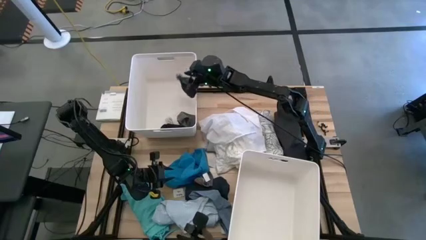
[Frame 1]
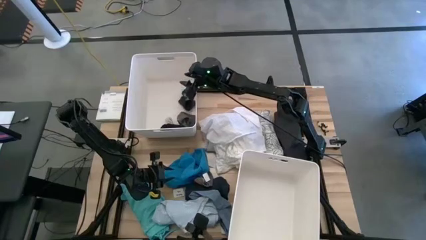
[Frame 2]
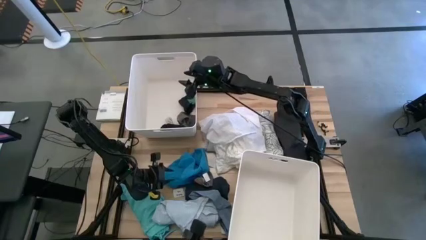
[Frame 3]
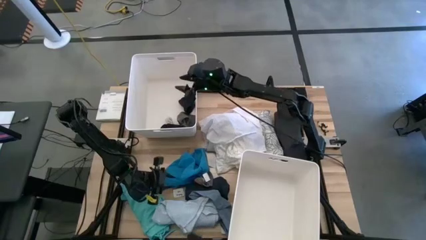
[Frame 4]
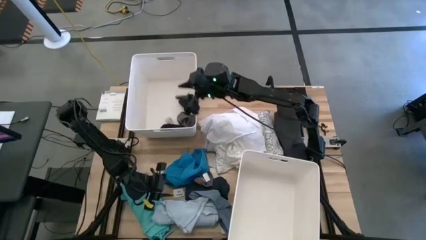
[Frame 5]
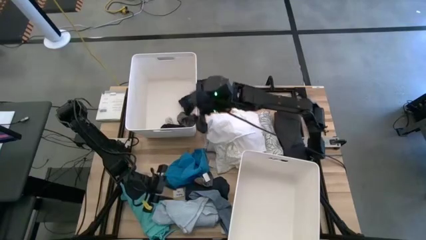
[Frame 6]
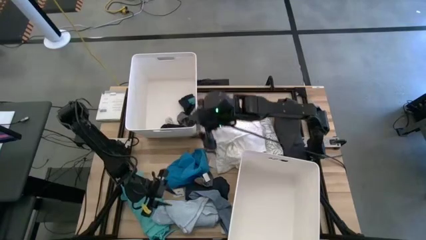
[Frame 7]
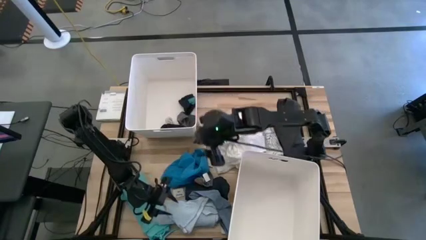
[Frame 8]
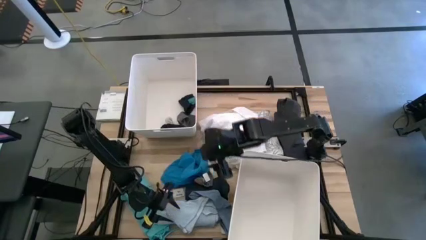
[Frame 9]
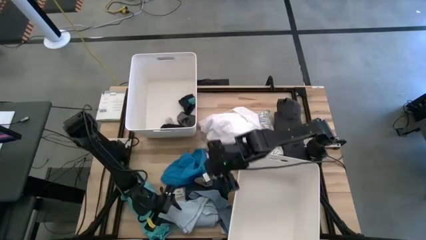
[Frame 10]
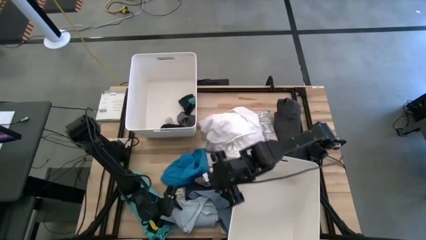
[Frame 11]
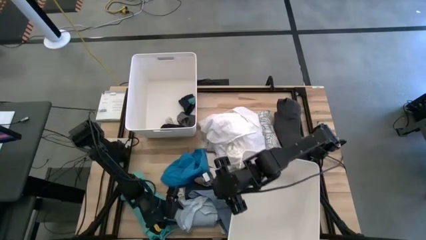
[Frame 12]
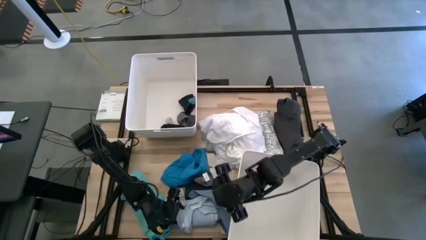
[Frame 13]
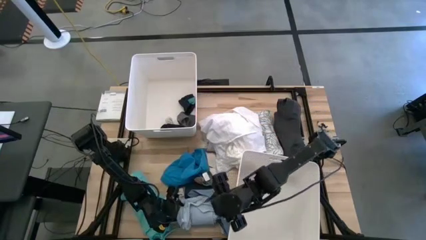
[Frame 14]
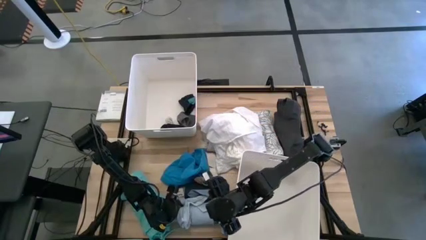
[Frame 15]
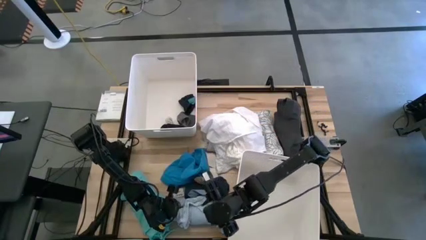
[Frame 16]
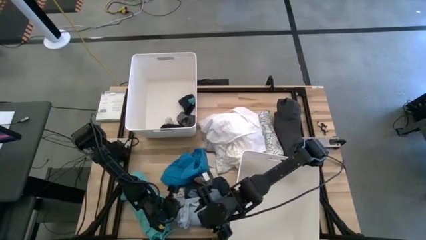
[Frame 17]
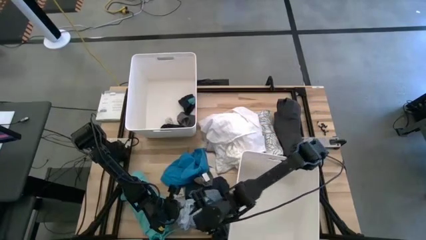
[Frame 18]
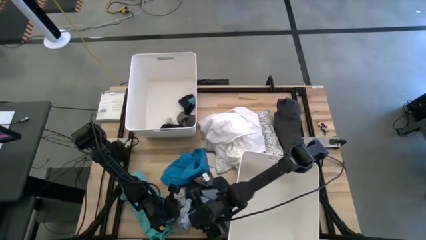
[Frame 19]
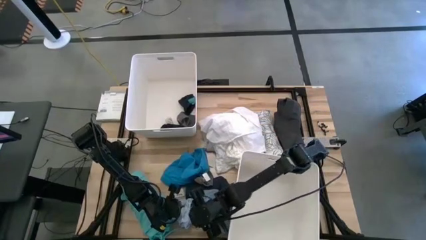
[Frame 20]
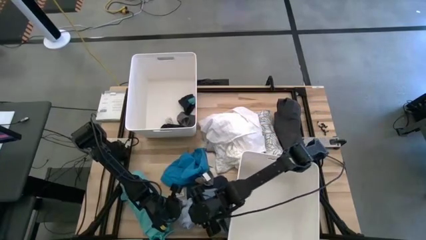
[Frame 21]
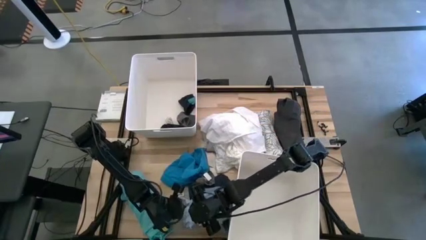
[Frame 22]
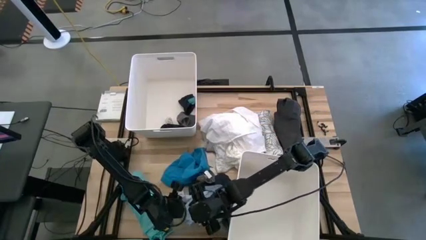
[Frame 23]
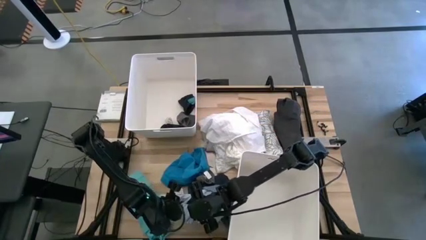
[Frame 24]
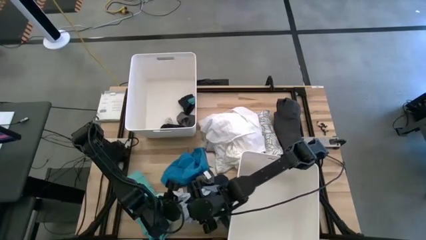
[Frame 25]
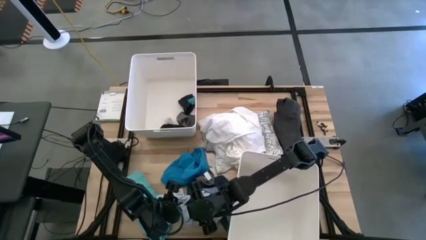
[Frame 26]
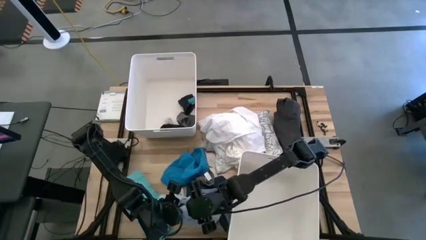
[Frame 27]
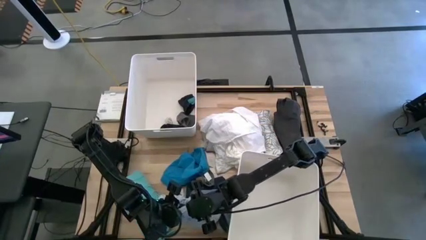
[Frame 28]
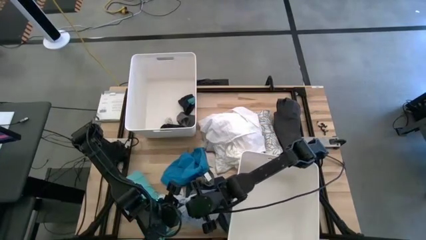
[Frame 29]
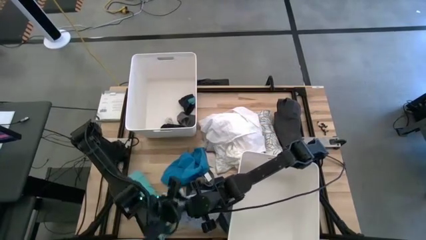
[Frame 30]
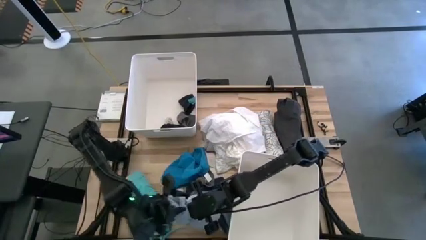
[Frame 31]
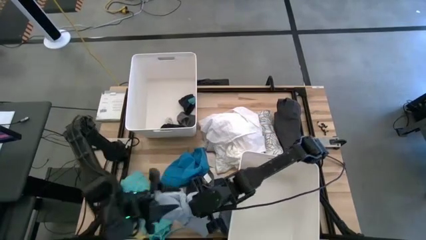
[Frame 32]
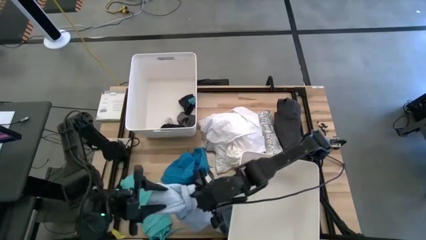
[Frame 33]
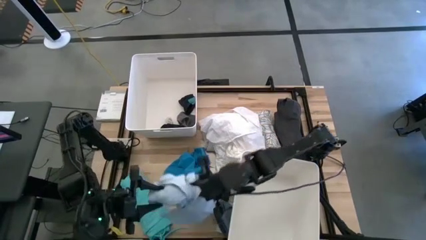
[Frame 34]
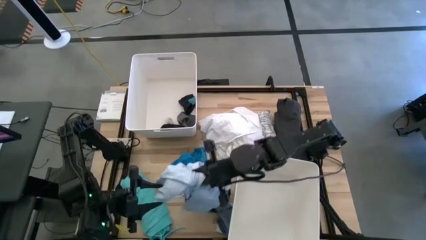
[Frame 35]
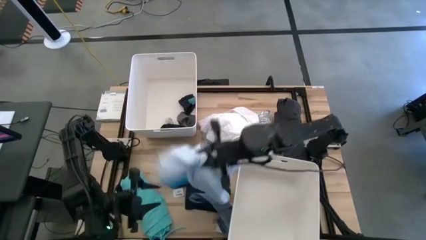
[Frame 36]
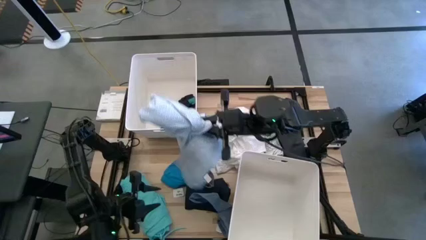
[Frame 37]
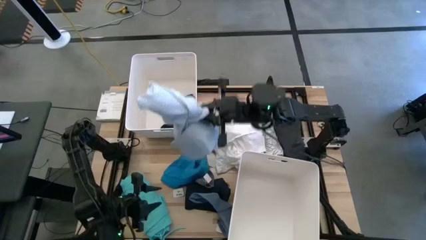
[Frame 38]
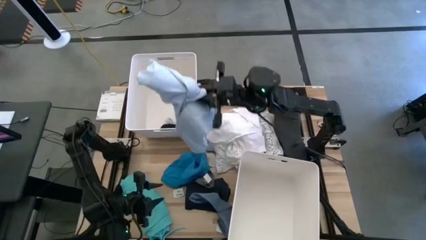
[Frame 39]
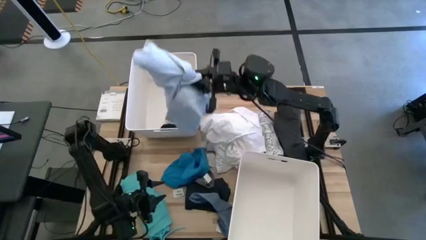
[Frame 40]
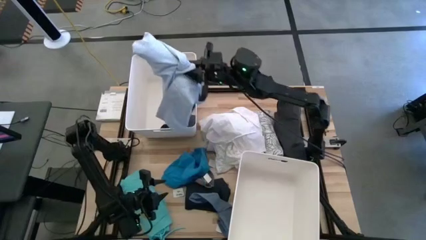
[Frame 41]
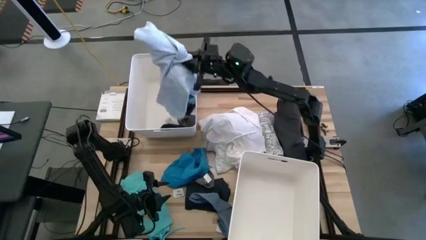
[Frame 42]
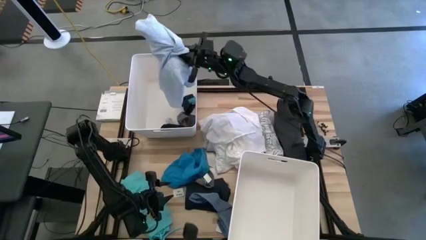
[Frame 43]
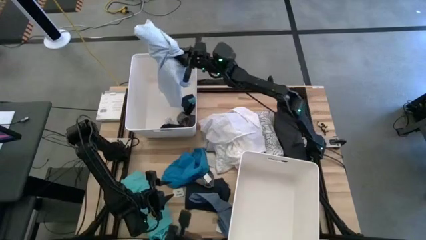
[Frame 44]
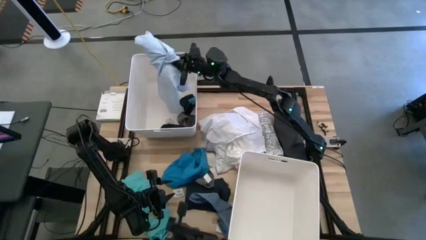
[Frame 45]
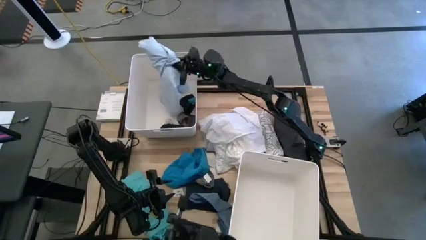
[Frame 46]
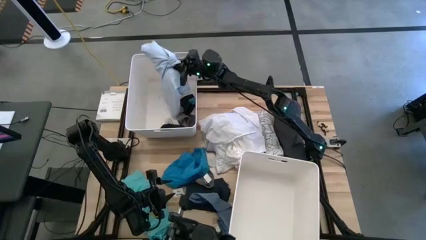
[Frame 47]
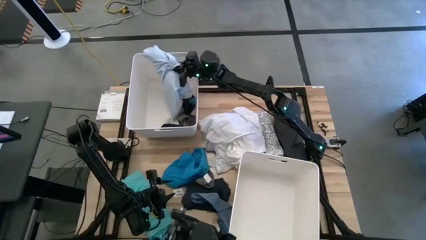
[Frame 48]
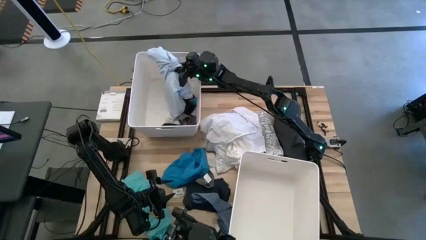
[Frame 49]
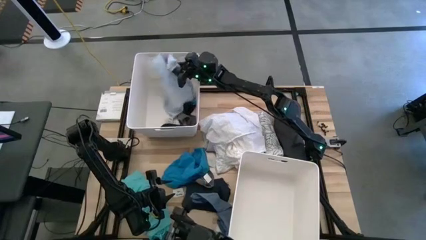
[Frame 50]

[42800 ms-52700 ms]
Task: Sort clothes
Put the patterned white shirt into the top white laundry bin

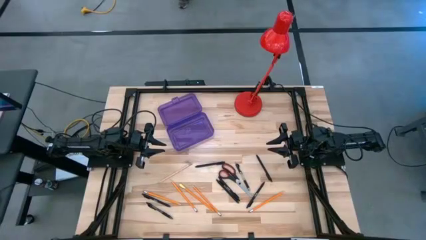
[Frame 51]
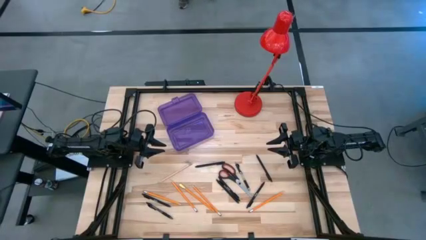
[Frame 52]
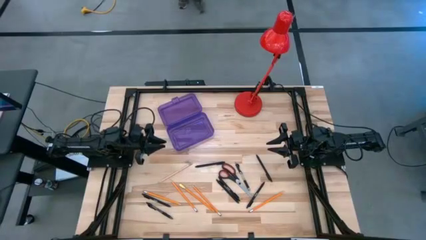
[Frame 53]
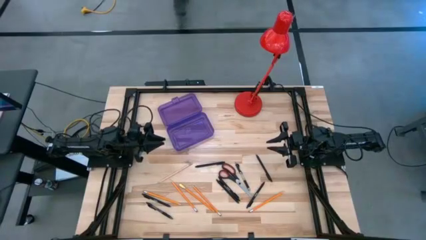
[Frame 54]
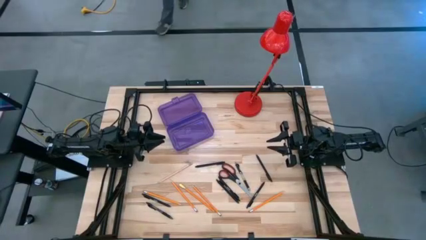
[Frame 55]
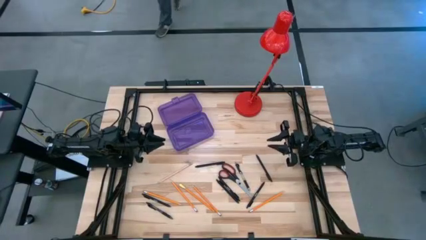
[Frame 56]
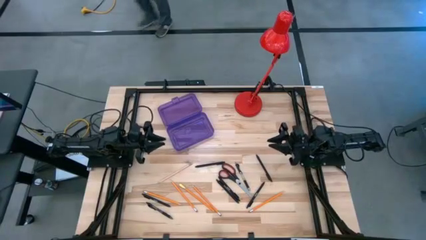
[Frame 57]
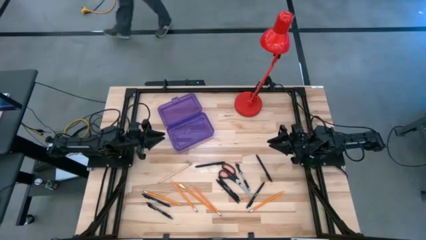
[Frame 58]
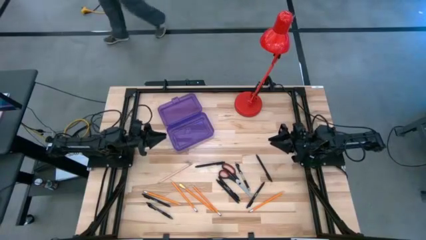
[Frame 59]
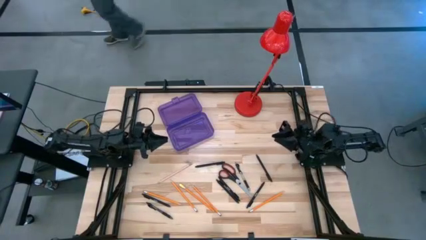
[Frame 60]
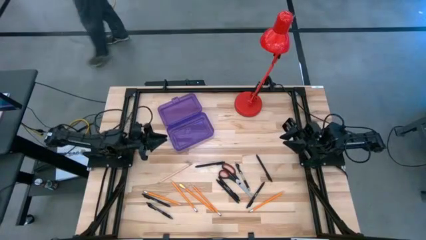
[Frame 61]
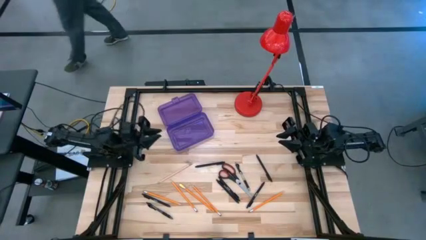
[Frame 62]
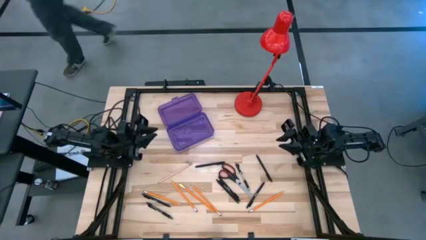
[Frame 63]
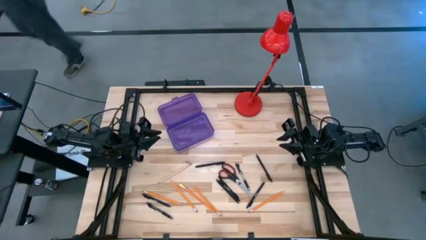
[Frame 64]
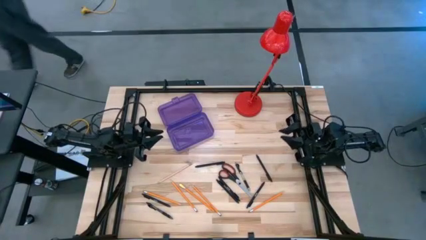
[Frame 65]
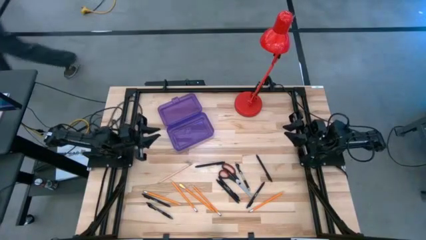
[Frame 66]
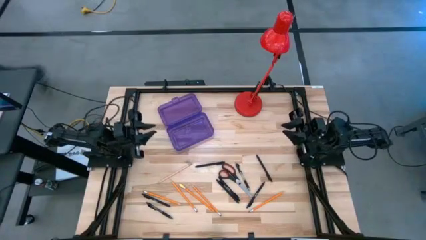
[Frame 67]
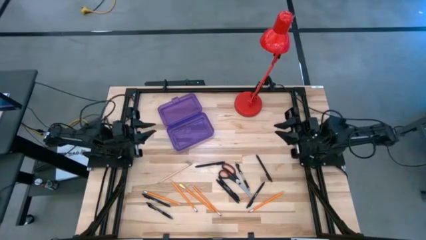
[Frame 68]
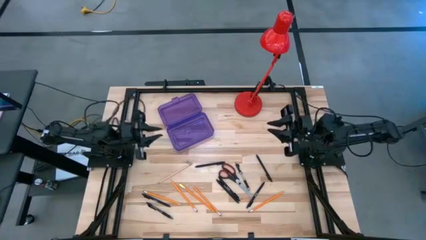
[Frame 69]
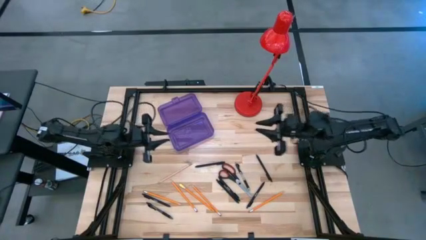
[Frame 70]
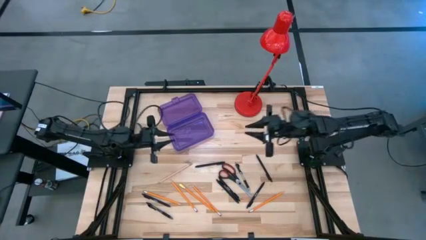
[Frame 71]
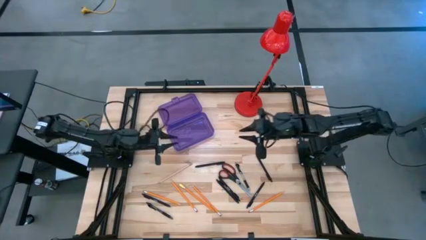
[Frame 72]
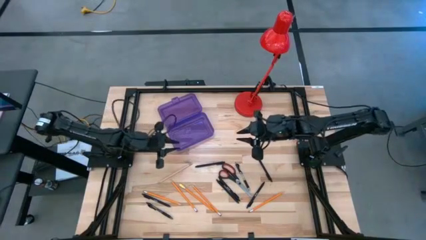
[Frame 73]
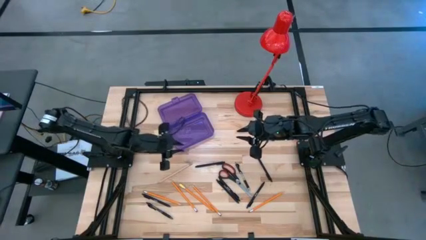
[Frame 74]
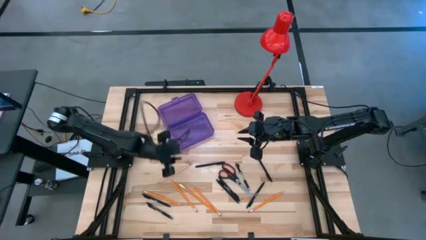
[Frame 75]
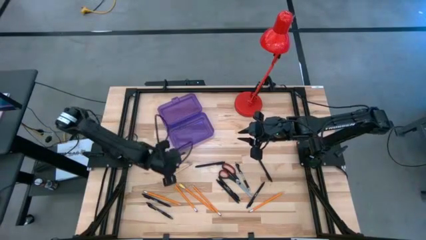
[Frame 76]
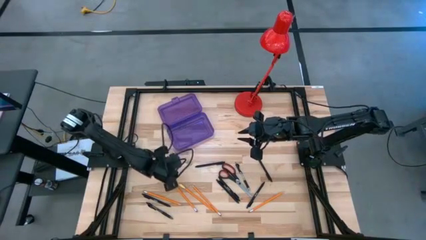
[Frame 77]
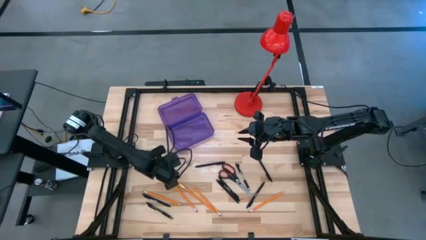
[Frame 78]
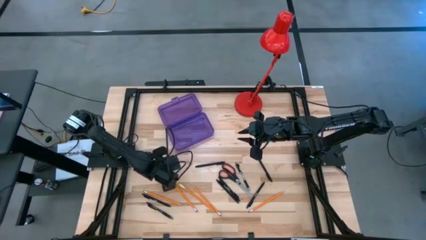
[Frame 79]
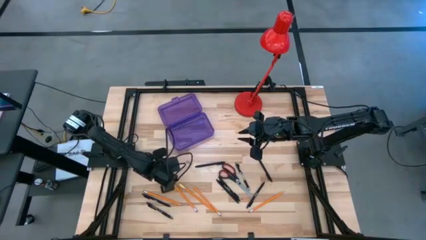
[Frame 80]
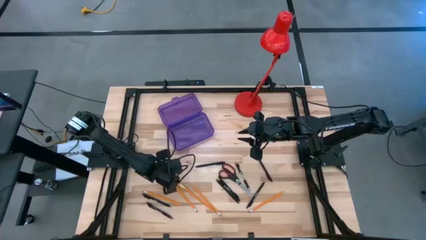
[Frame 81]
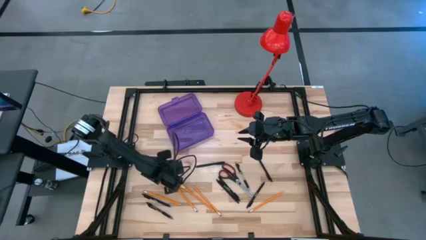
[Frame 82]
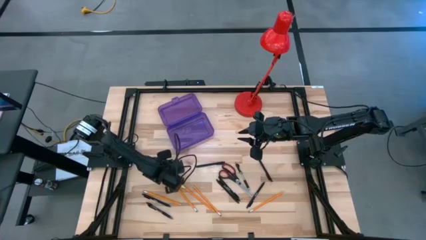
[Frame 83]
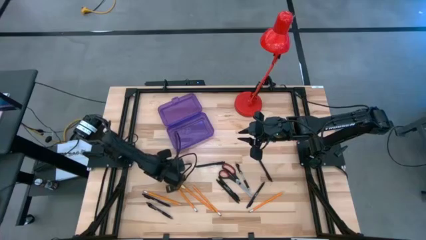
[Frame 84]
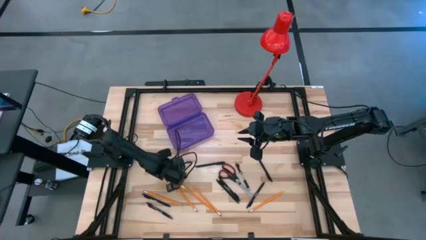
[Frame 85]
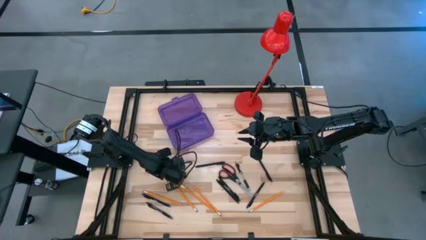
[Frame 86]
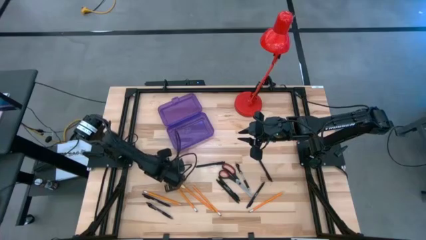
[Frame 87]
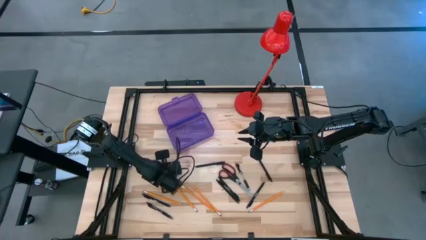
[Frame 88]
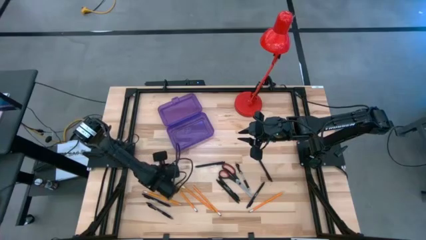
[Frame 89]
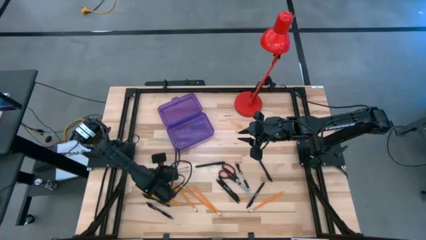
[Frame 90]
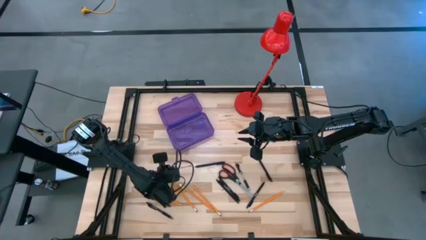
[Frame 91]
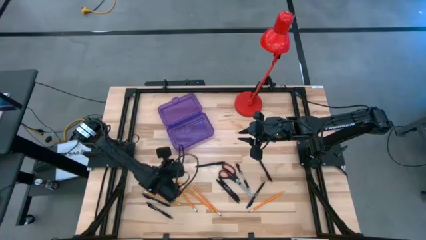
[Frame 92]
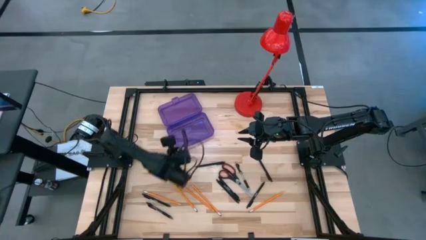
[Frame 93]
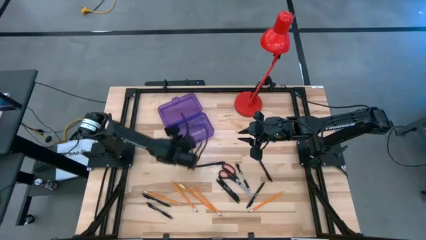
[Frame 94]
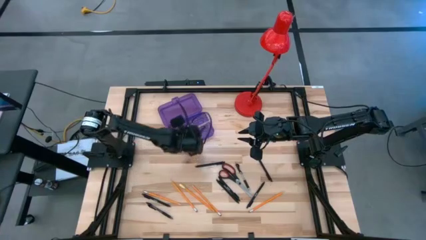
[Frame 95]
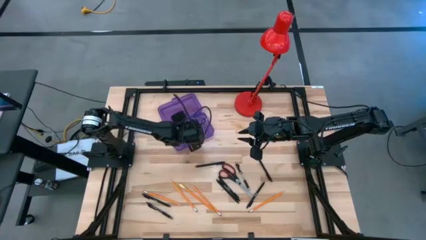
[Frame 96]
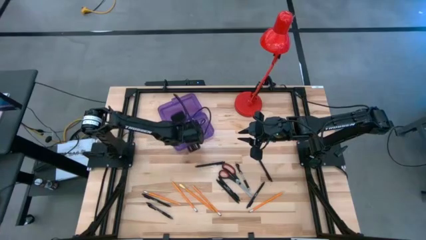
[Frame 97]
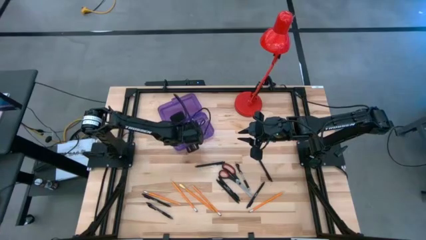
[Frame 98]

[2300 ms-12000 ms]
Task: Pick & place school supplies into a supply box
Put the light pink pencil into the purple supply box
